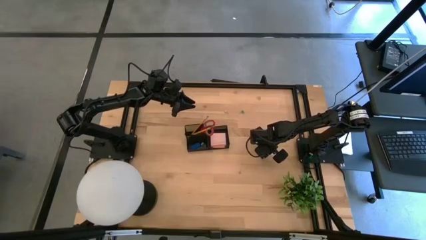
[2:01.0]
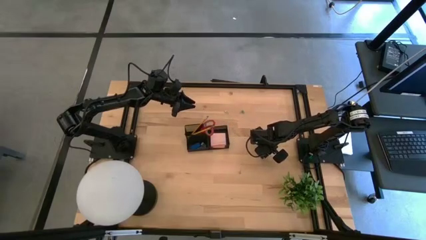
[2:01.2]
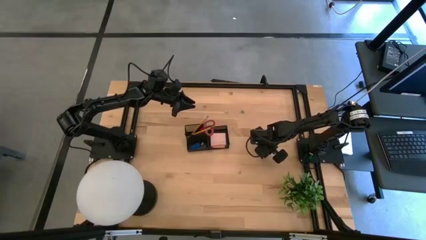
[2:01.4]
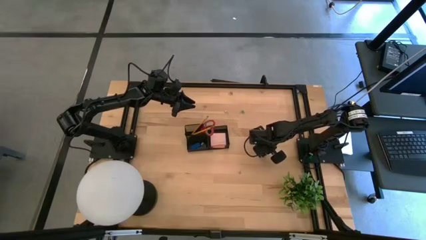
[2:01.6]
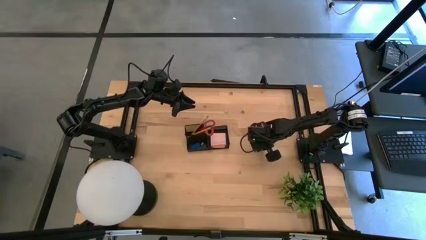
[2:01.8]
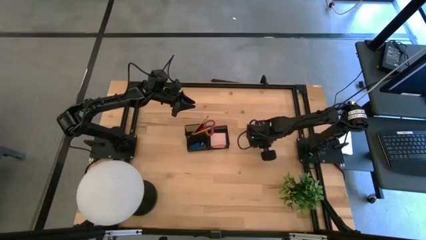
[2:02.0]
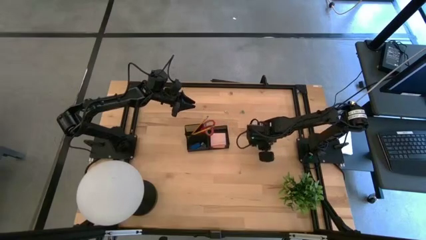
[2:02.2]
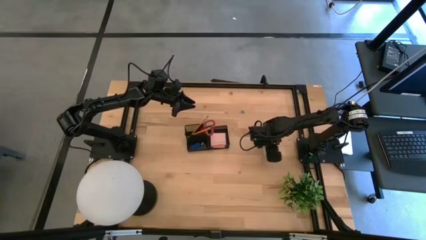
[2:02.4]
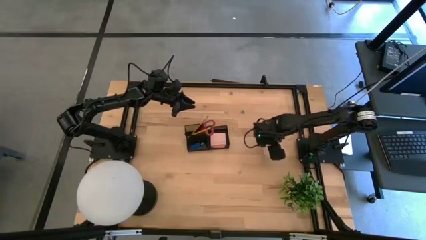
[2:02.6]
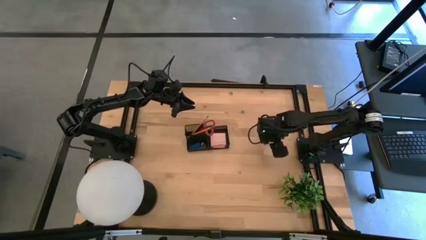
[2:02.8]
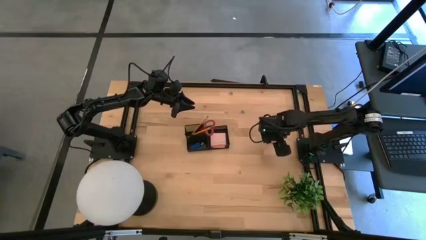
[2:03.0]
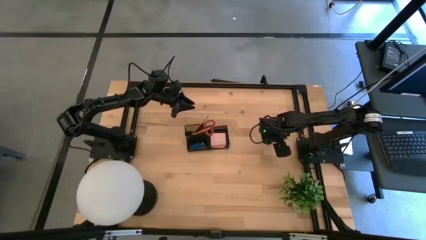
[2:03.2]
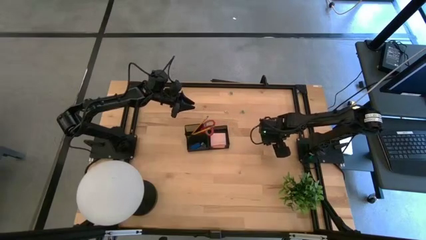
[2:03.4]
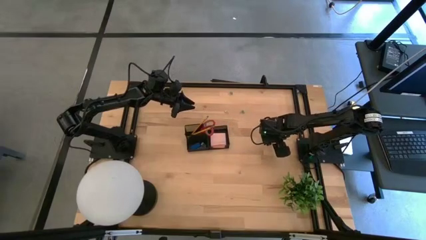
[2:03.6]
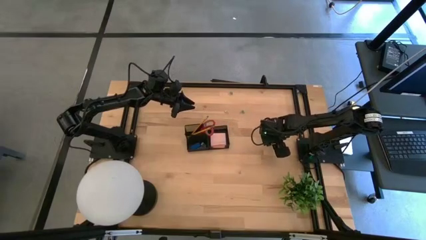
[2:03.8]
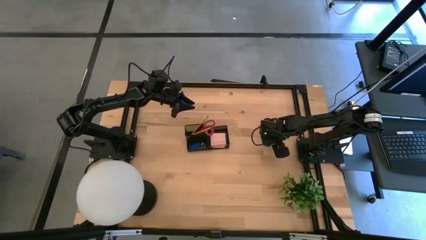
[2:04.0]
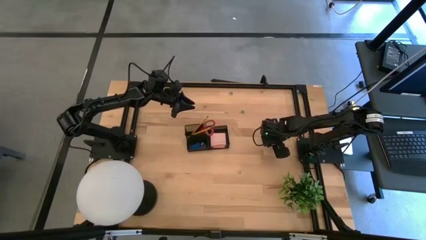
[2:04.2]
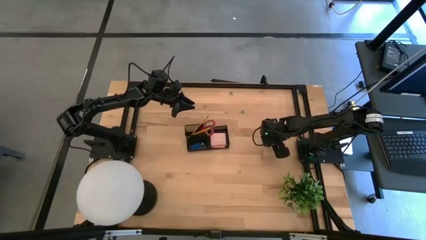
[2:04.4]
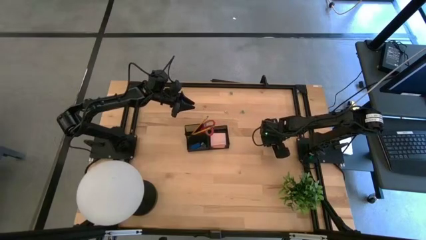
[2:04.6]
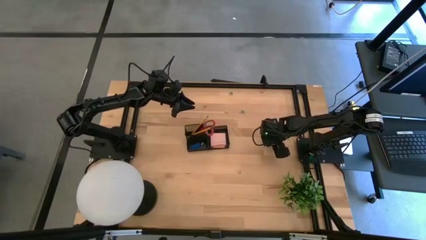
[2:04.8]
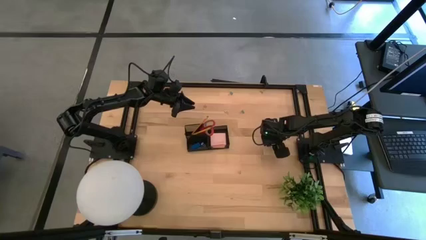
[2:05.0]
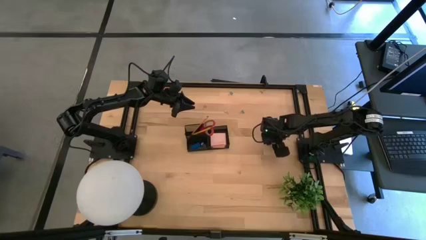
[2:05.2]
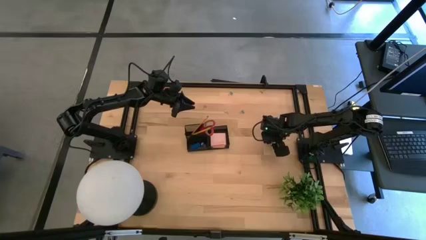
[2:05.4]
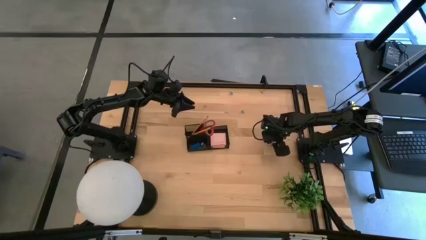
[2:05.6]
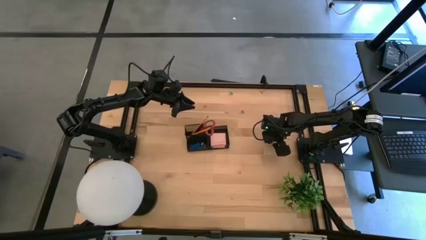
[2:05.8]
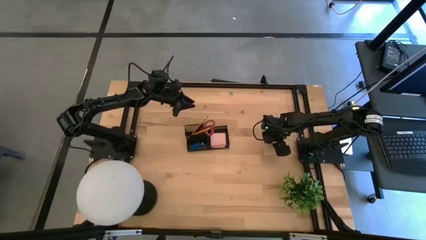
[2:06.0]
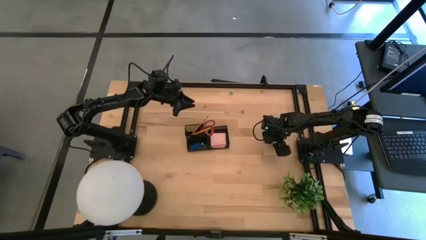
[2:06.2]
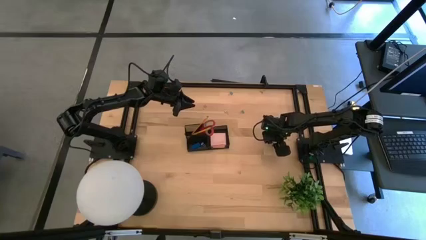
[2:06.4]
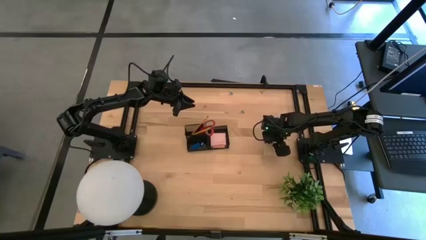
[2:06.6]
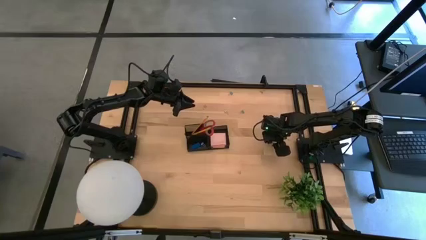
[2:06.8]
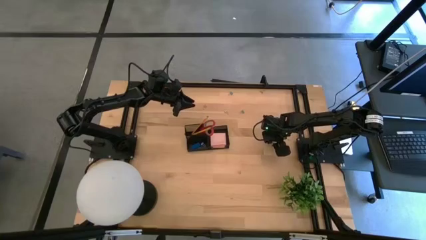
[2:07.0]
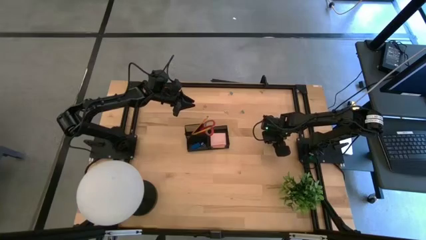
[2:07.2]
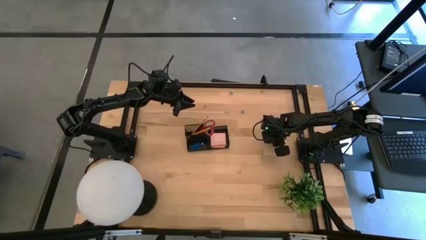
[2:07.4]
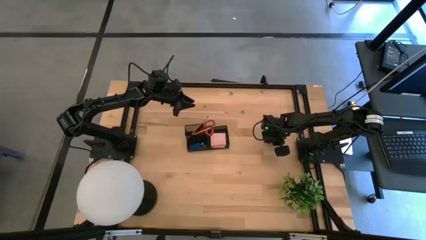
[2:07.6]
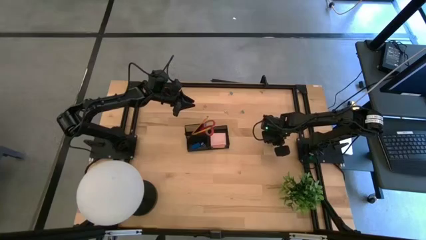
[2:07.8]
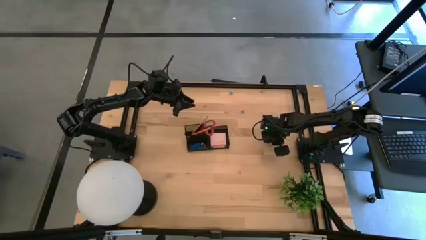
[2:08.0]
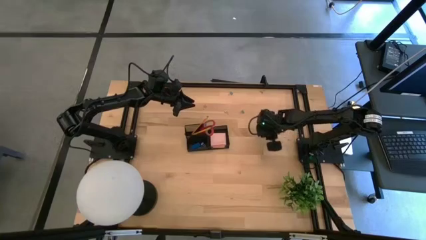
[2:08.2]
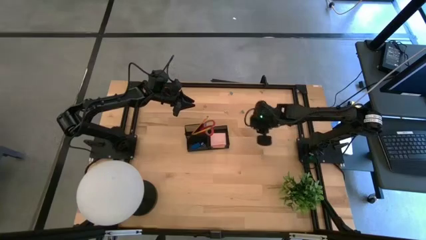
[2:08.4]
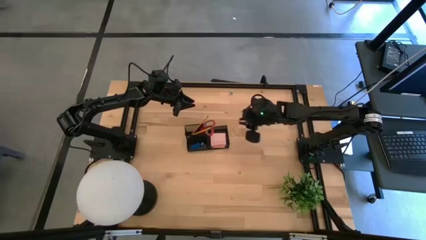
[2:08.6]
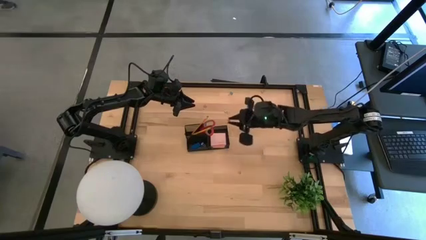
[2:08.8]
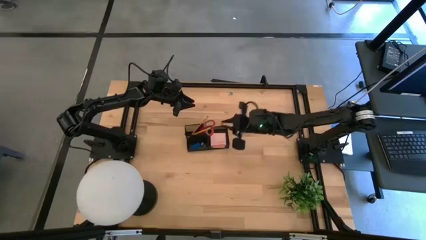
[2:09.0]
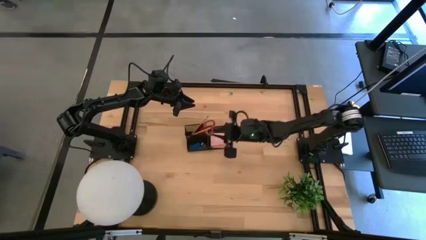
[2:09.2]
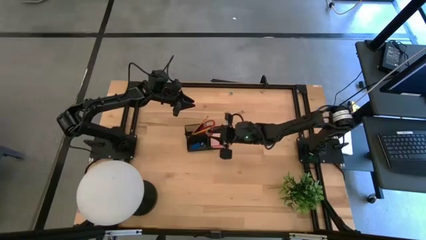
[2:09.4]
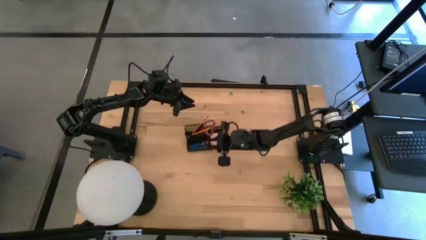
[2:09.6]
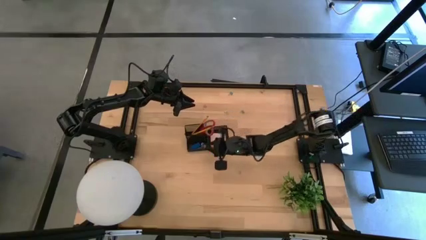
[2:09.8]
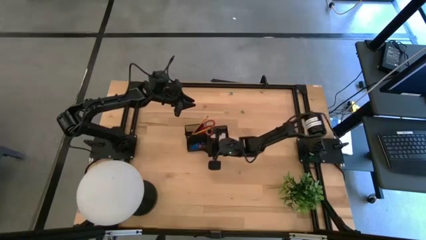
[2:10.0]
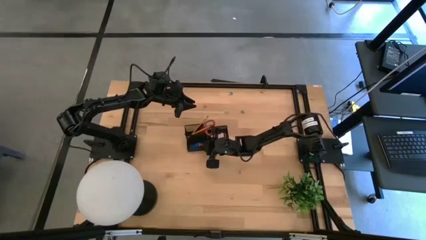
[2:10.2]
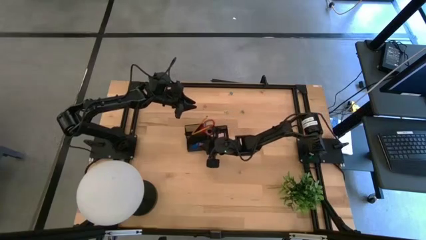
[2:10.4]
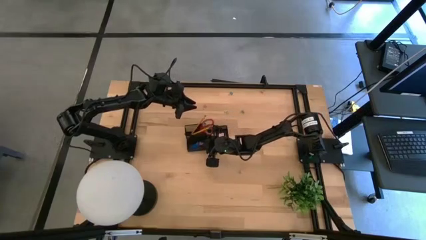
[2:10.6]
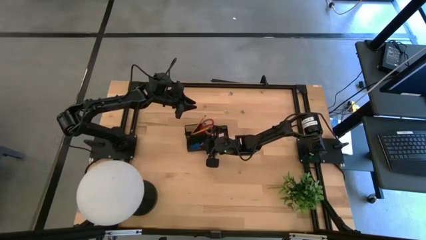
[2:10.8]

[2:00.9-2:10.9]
Task: Pick and place office supplies into organizer
Put the pink binder clip into the desk organizer

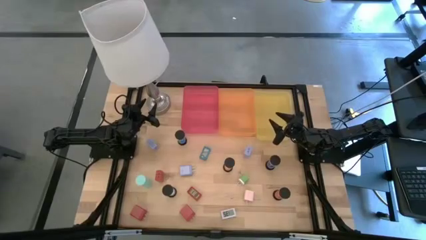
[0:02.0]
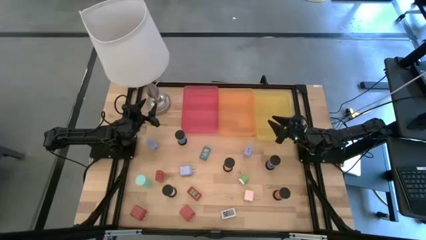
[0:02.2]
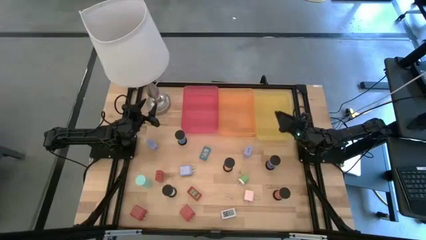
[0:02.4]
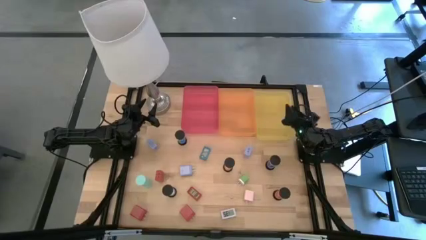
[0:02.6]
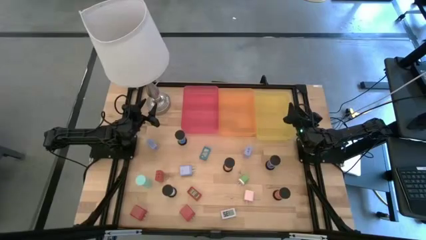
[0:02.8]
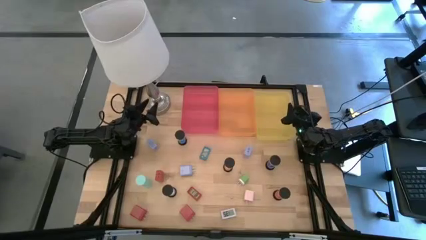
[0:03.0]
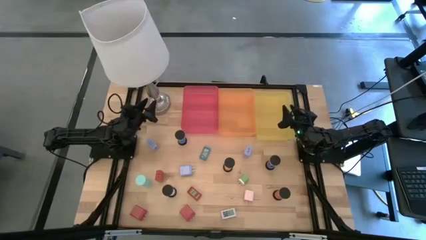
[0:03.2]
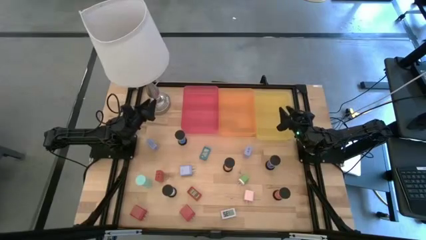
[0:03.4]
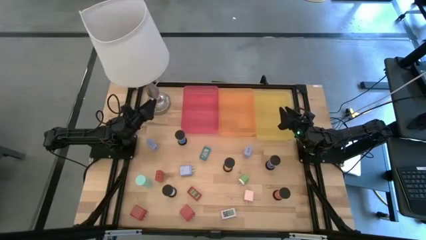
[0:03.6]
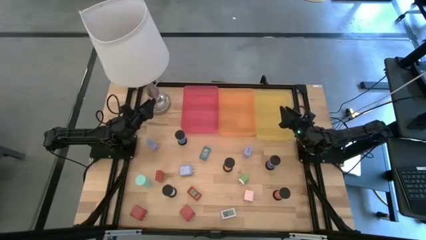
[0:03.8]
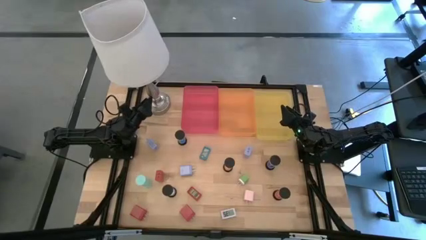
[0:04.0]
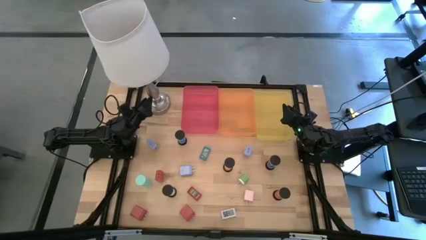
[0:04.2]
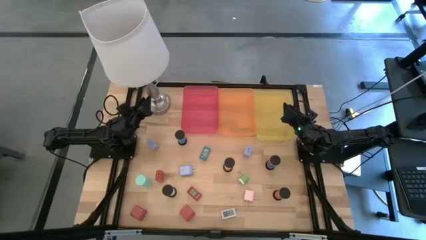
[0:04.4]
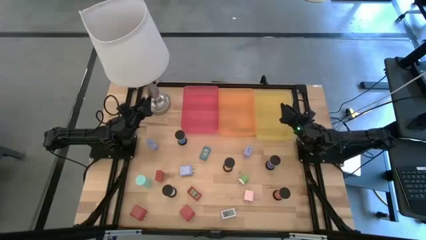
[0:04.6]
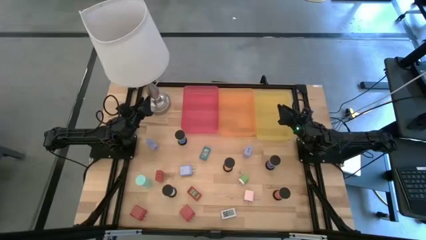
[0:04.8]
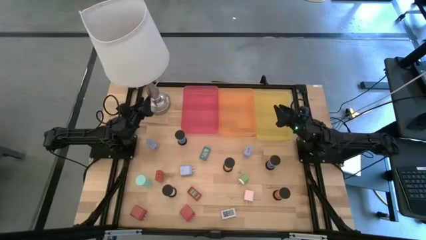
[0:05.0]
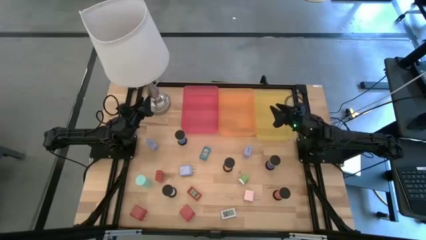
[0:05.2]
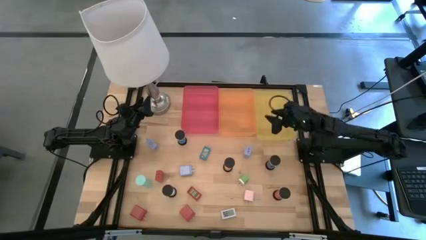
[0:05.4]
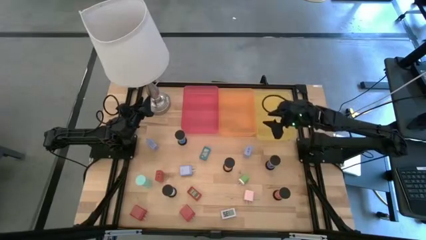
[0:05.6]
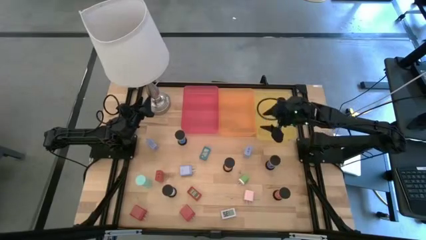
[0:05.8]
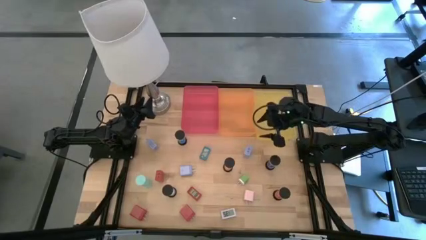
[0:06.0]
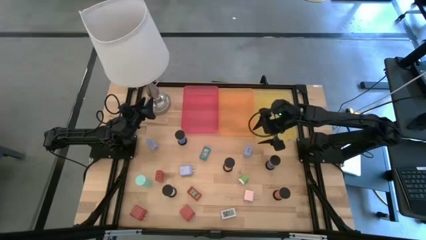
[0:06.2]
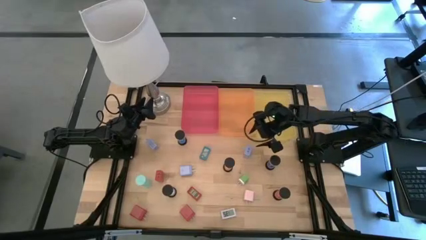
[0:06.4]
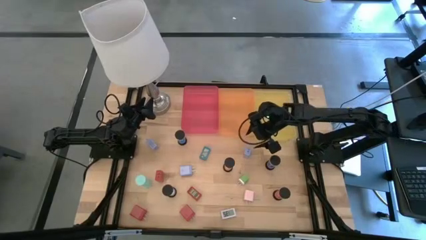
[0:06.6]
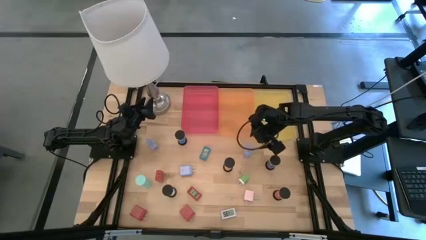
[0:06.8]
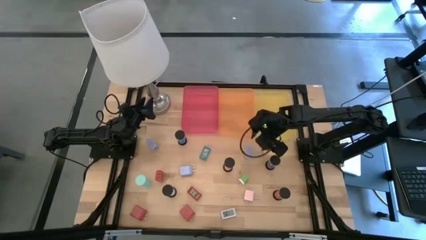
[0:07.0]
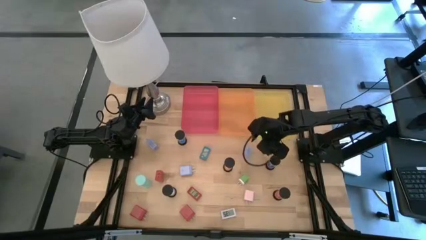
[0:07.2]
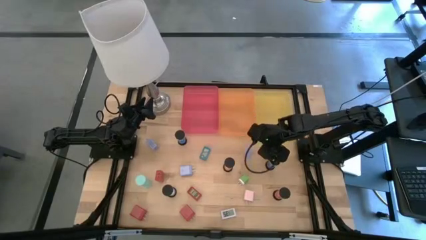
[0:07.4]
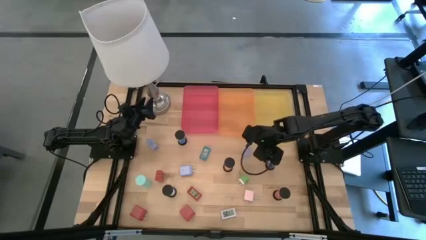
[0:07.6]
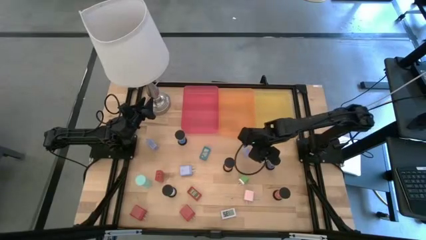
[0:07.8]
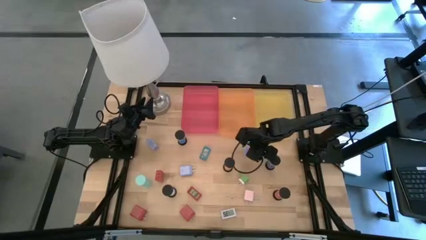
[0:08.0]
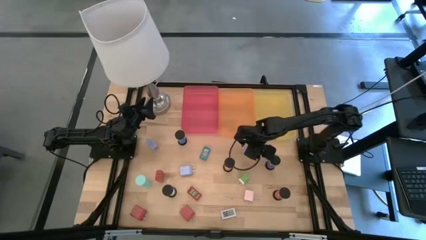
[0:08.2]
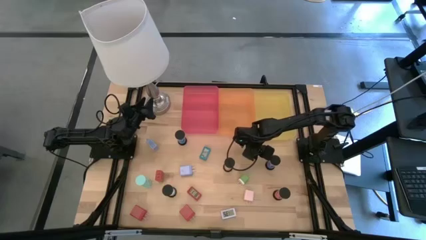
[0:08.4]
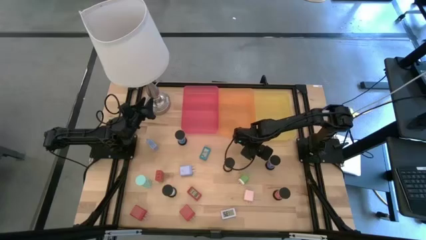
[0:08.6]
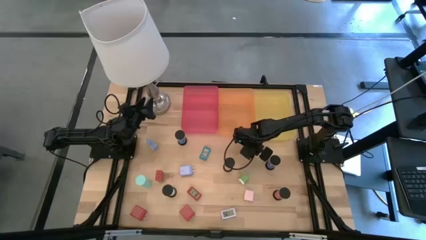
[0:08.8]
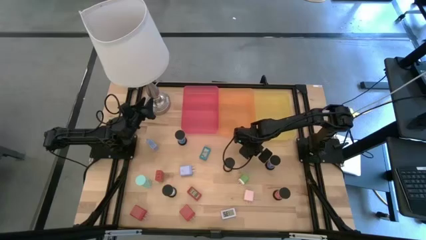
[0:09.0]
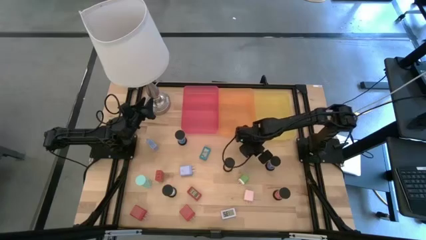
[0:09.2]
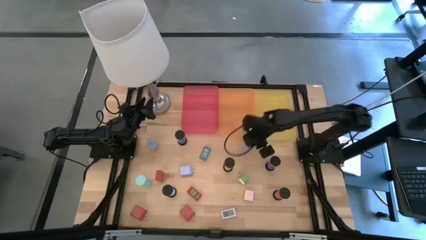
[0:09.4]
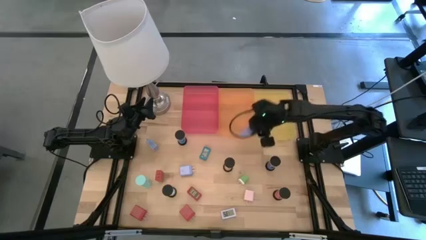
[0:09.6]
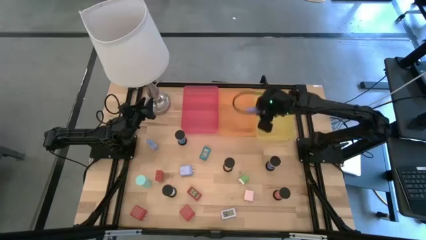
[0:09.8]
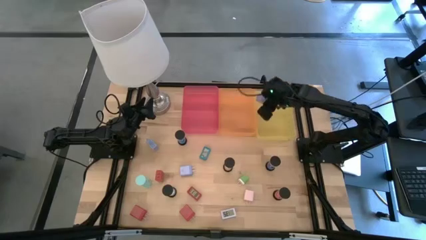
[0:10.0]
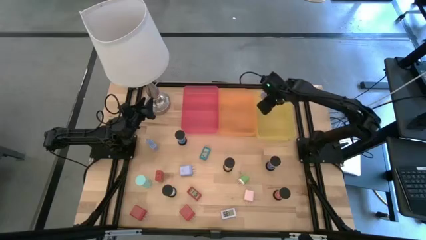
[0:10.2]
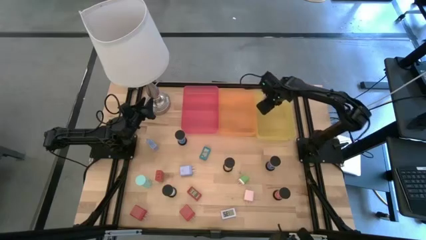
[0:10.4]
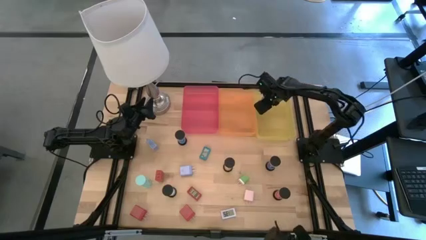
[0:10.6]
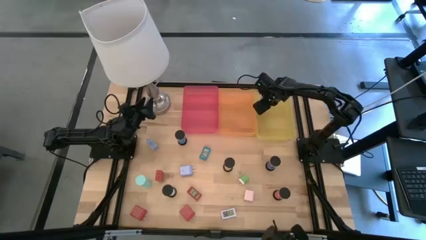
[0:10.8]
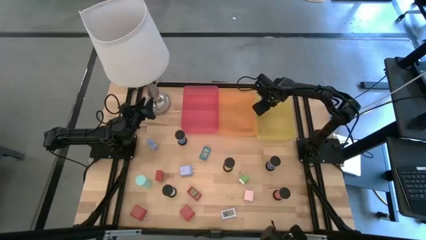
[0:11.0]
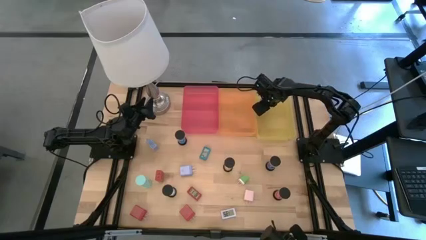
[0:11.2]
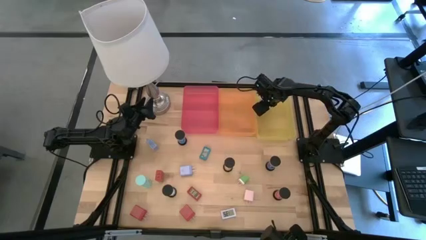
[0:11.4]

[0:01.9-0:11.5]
Task: Pick & Place Office items
Put the top right blue charger adapter into the yellow bin
